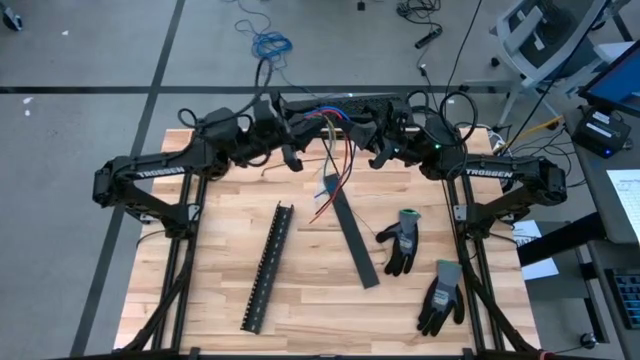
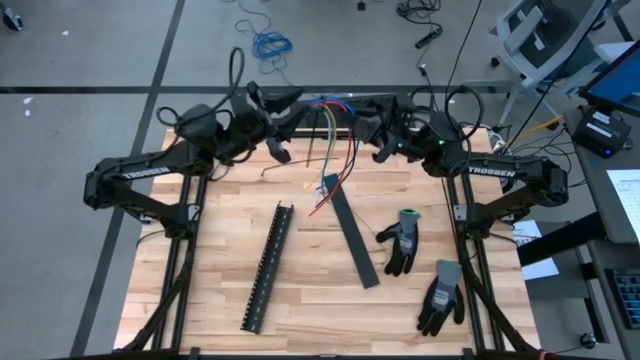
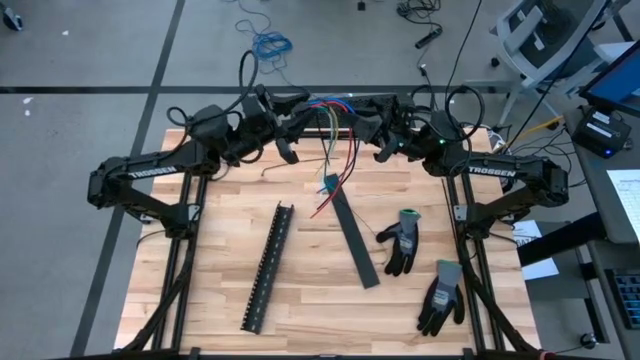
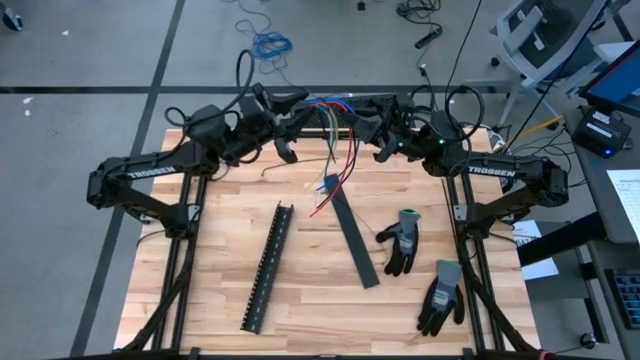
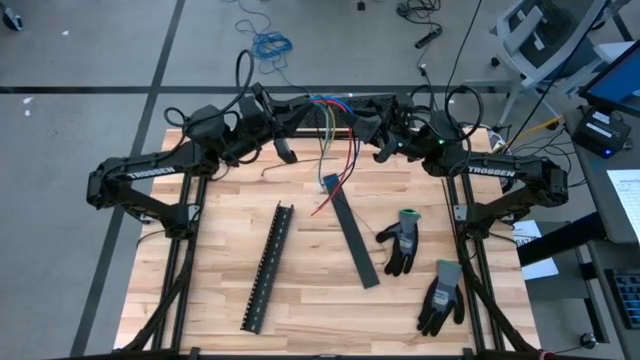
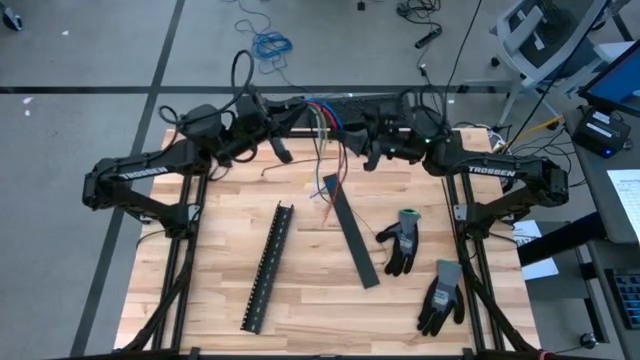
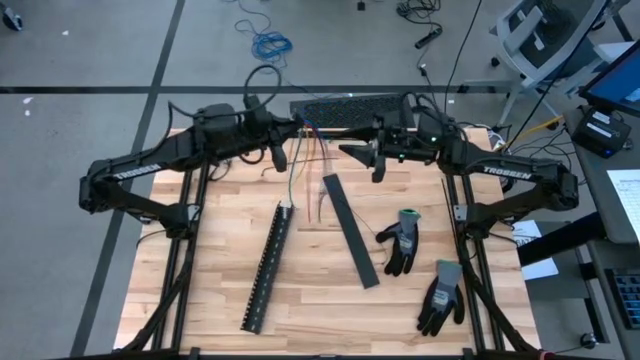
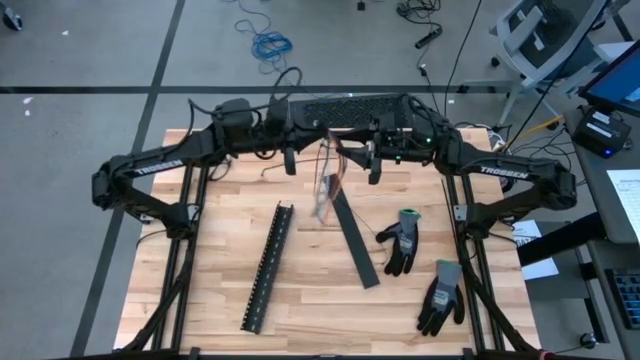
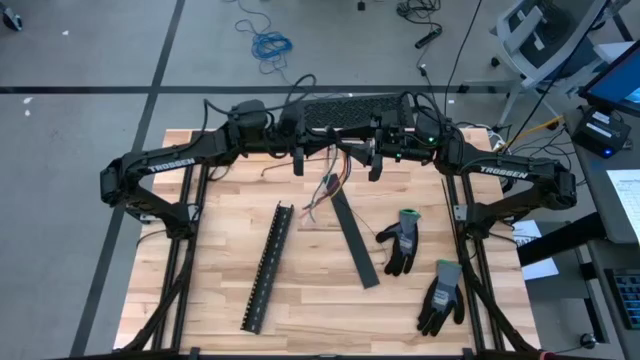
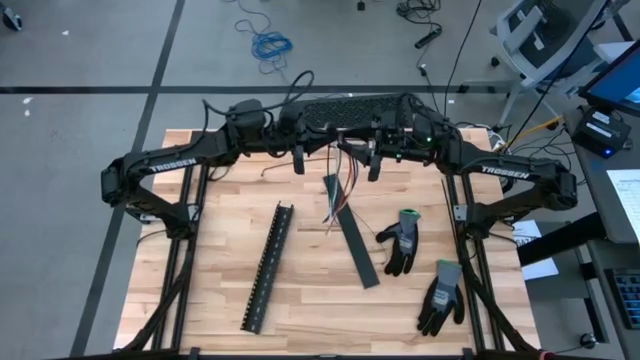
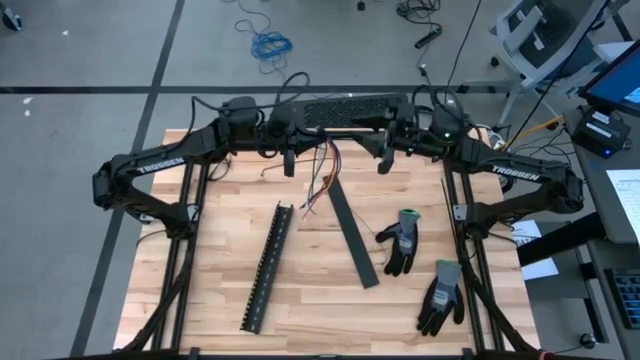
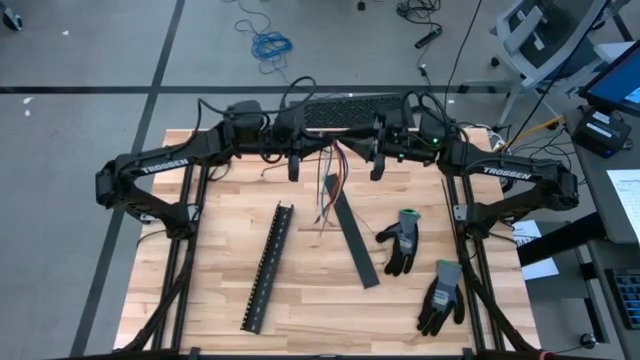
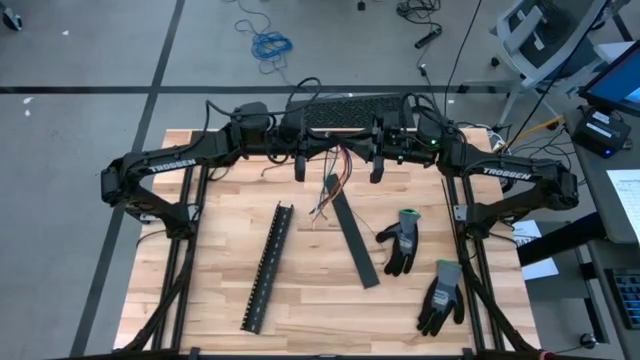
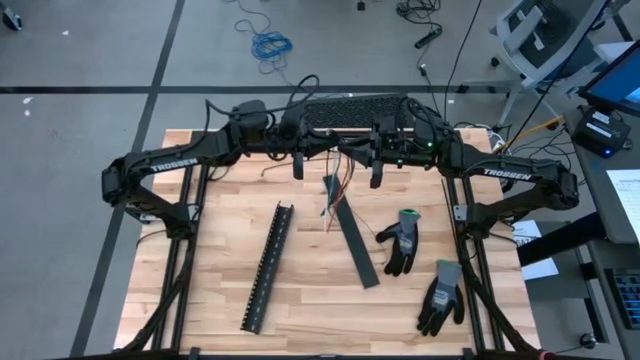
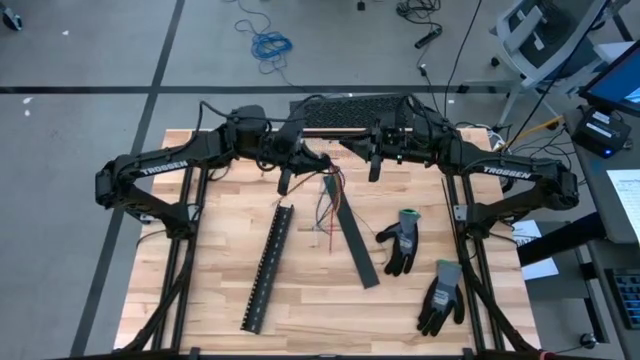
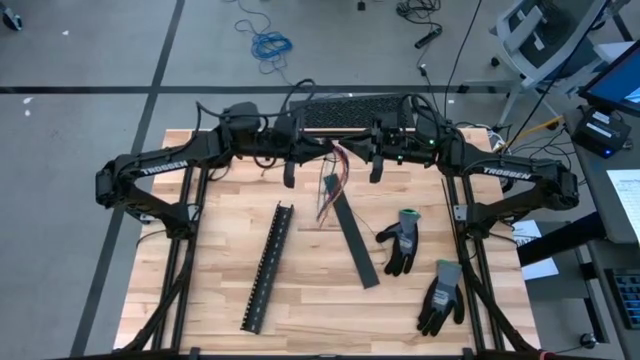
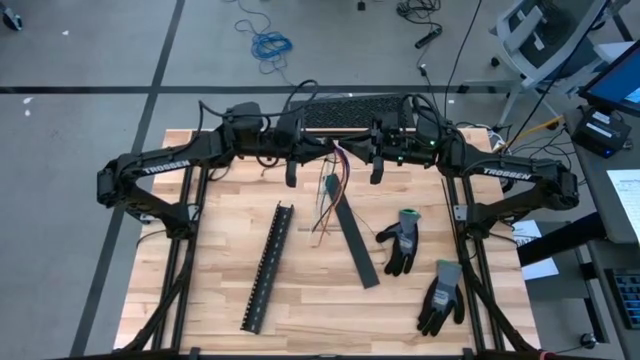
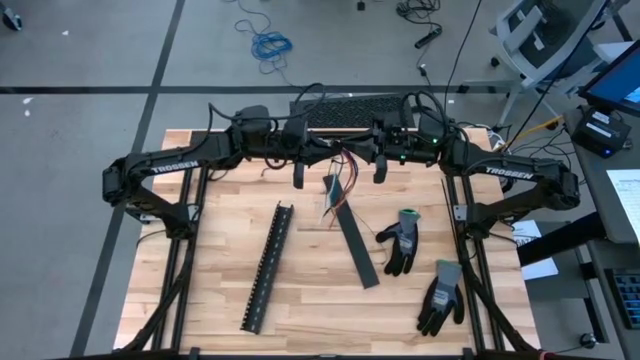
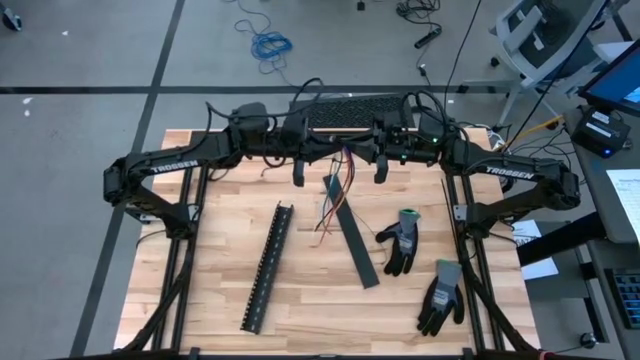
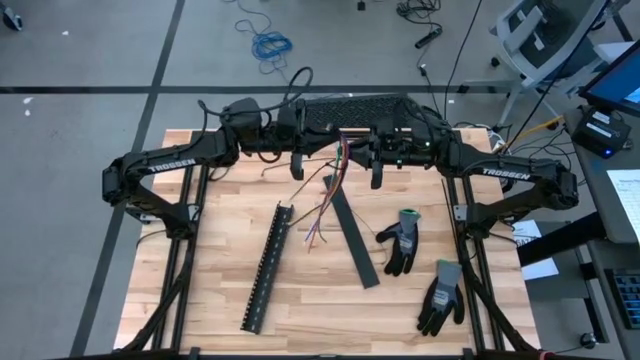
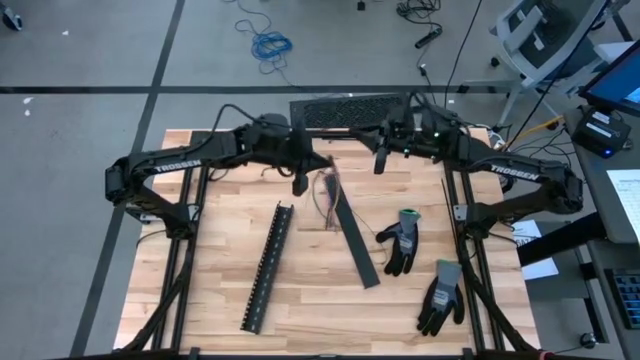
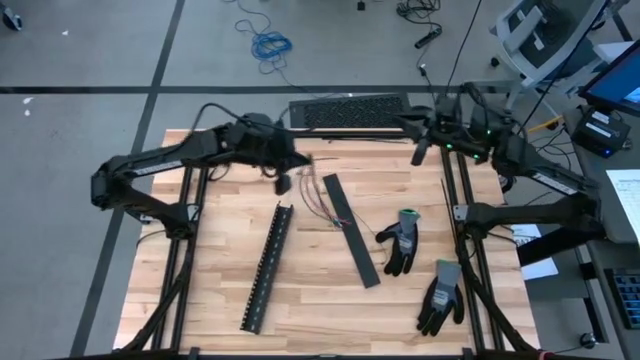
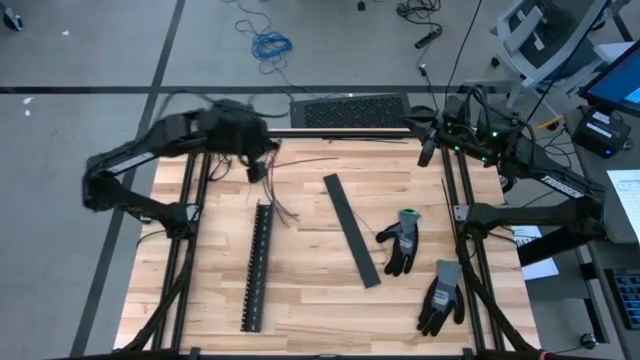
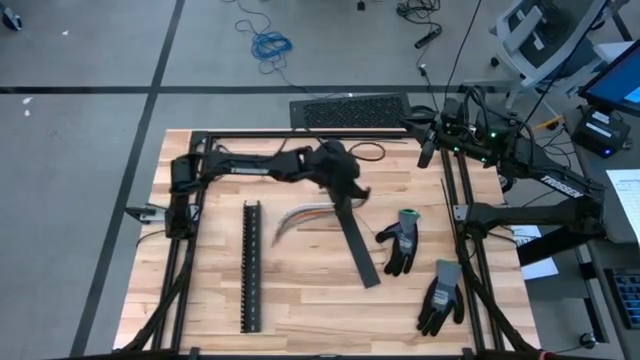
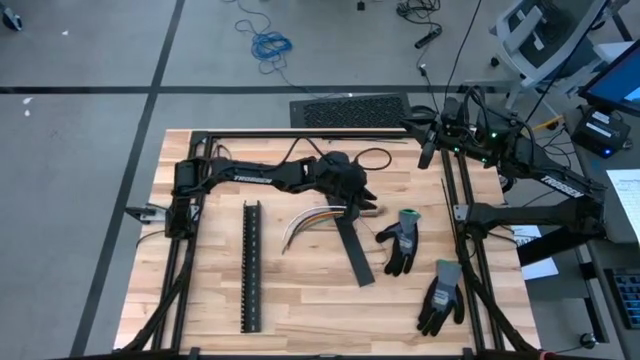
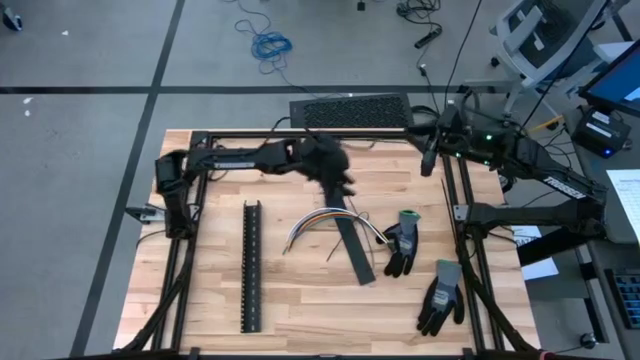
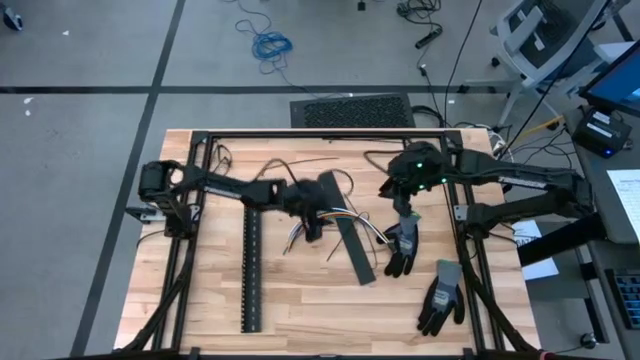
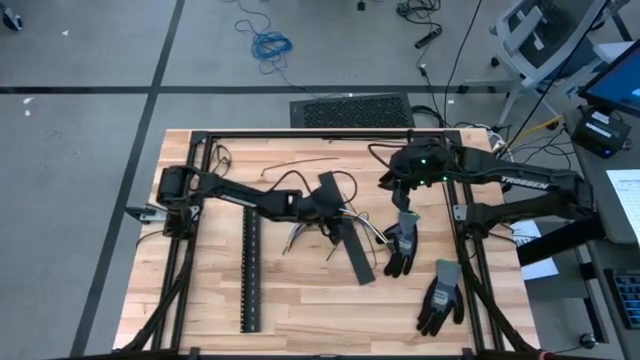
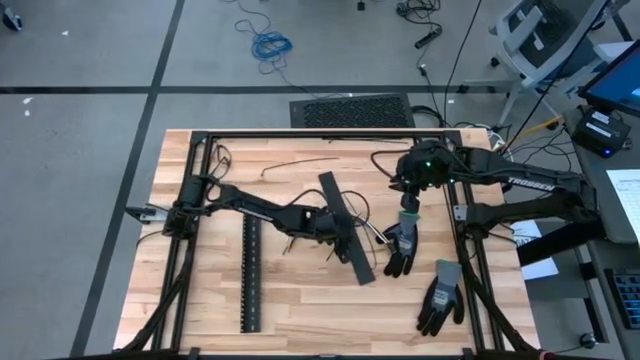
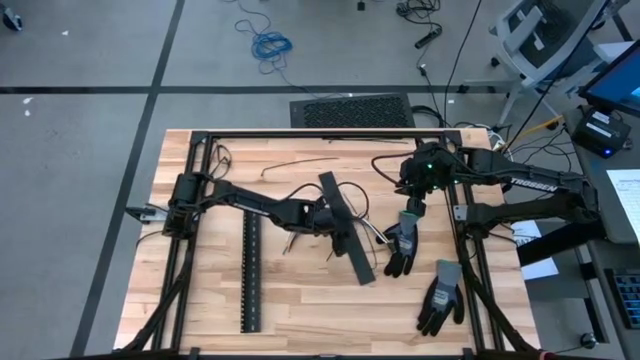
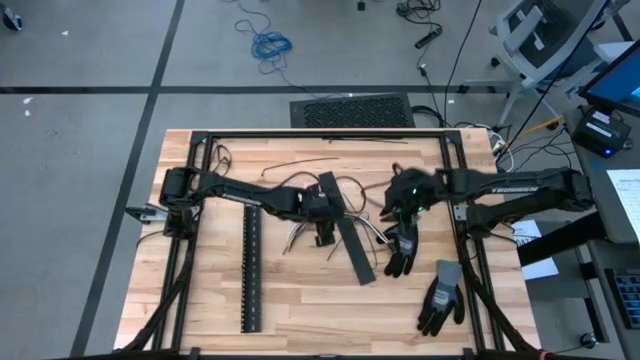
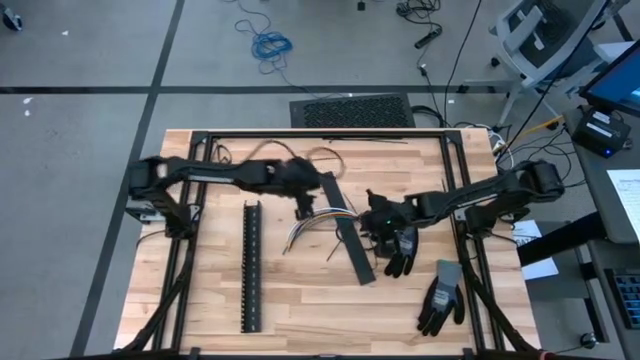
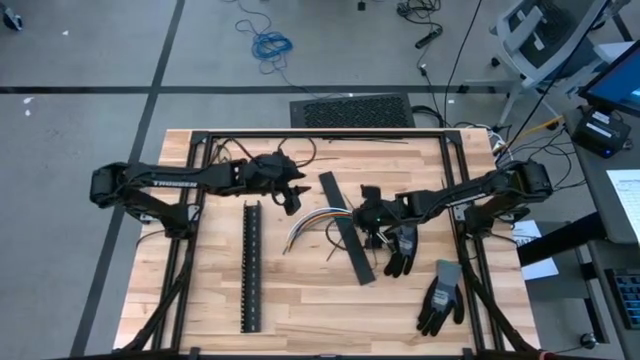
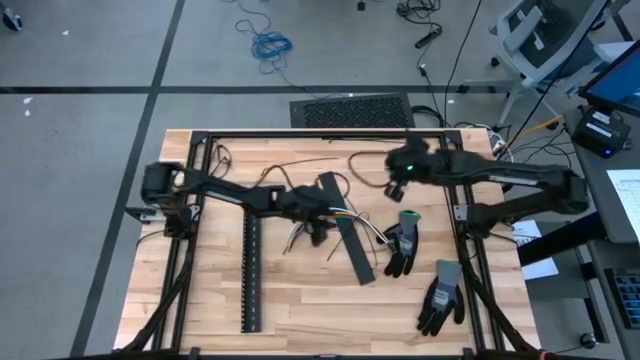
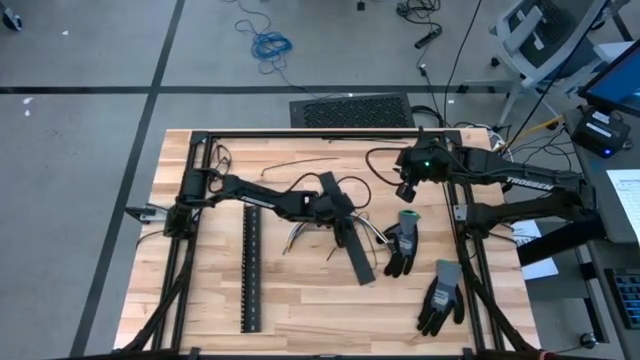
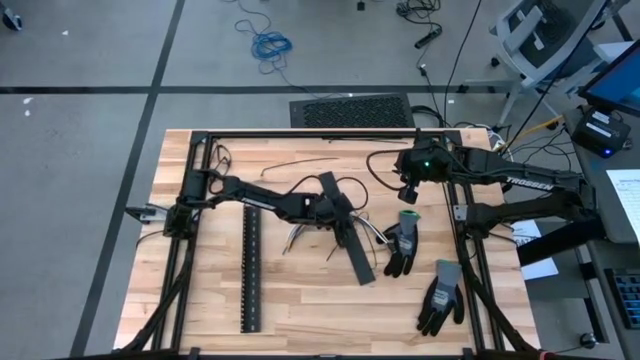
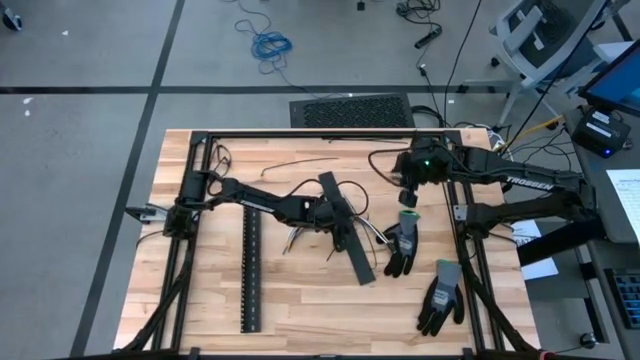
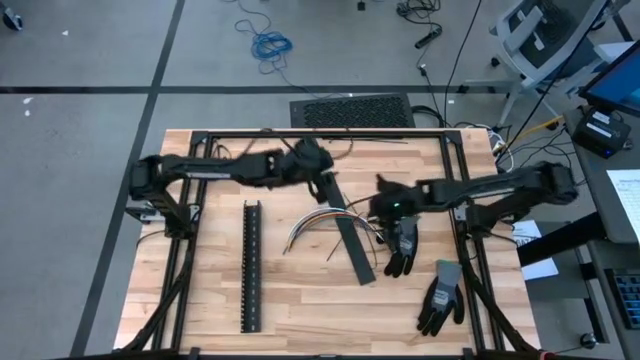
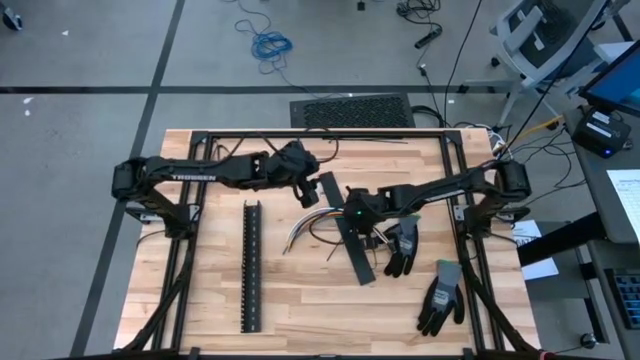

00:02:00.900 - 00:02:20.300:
Task: Ziptie cables
Wrap the black zip tie on the cables

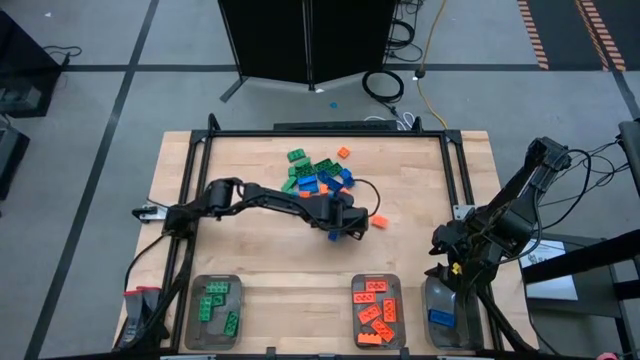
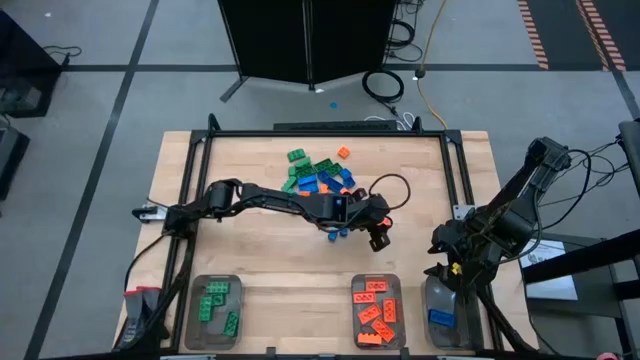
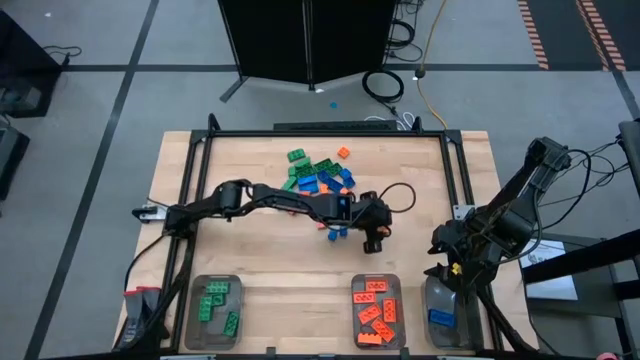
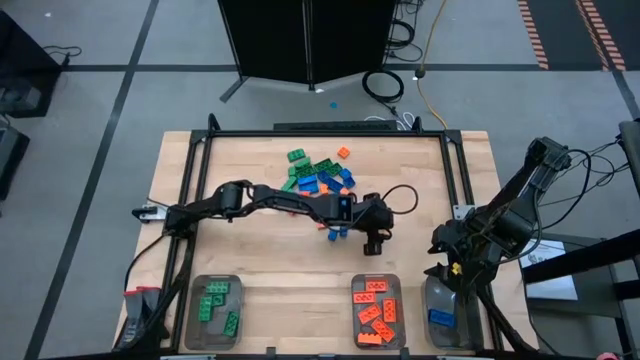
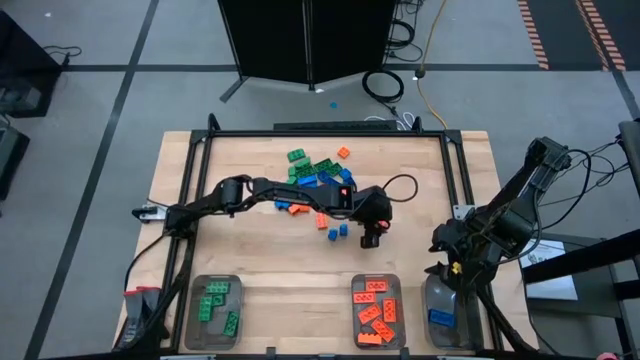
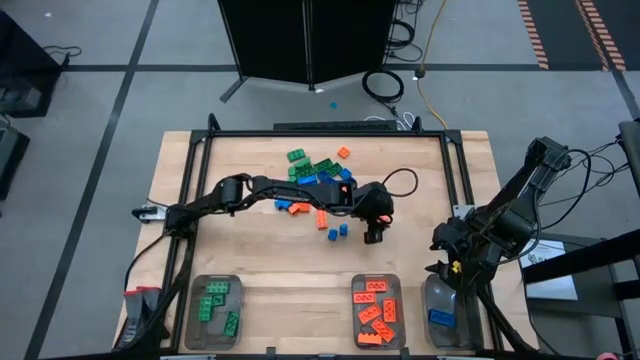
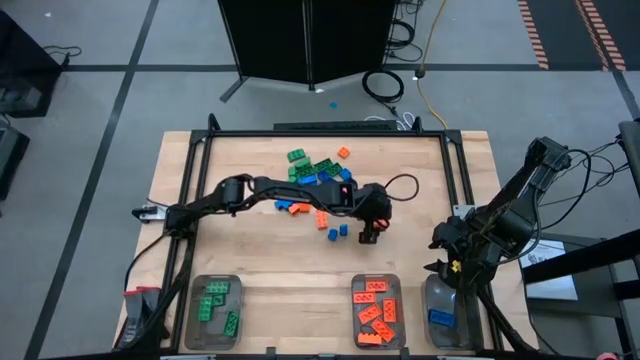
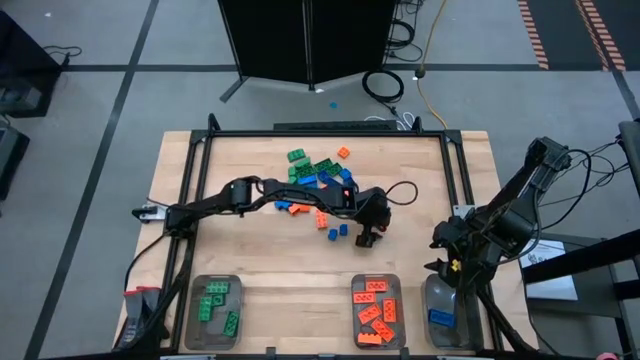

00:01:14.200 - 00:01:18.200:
Task: Sort blocks
Put the orange game piece into the center black bin
